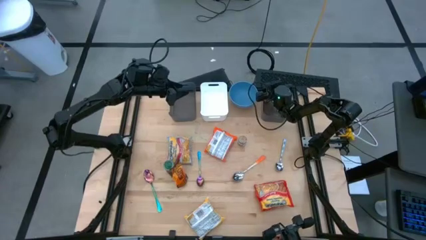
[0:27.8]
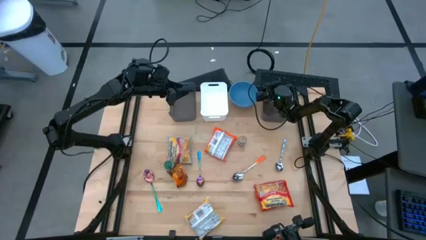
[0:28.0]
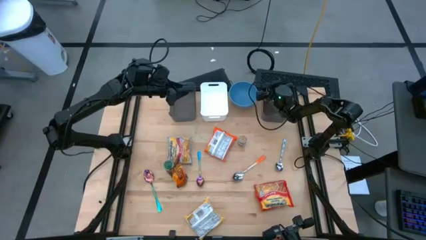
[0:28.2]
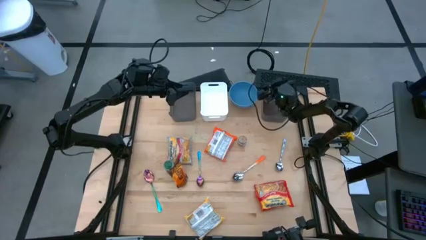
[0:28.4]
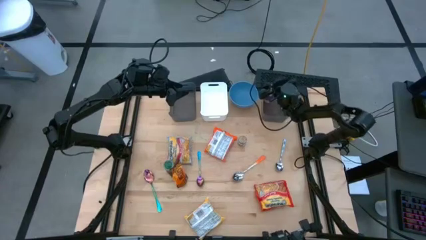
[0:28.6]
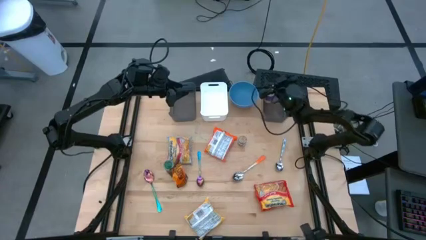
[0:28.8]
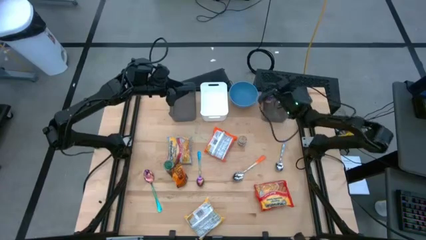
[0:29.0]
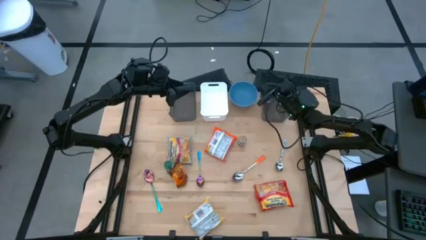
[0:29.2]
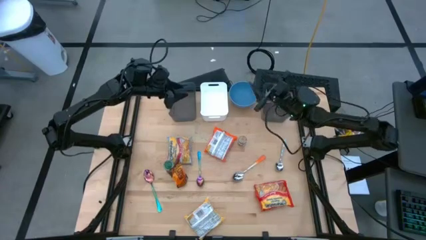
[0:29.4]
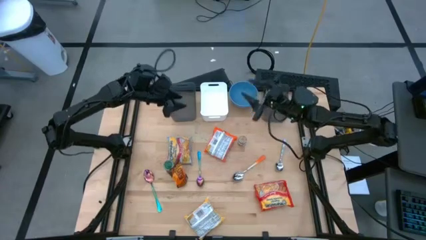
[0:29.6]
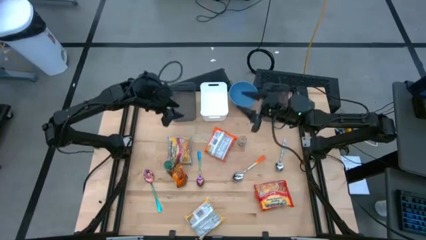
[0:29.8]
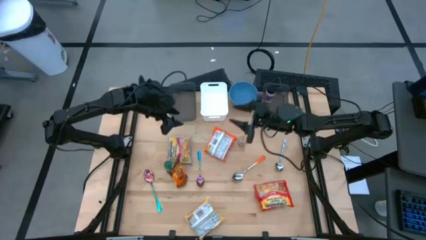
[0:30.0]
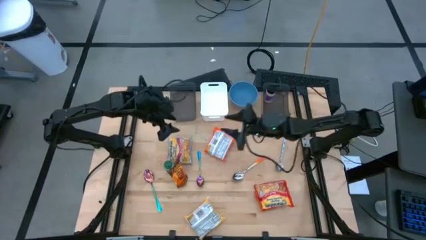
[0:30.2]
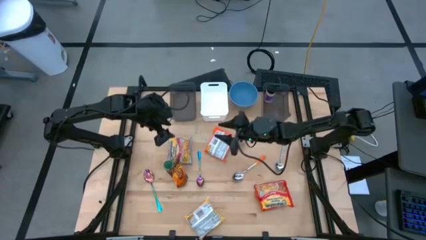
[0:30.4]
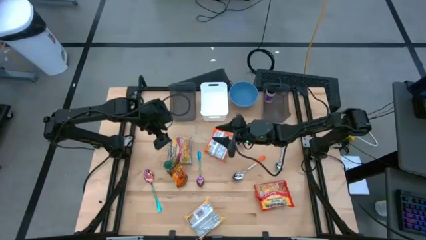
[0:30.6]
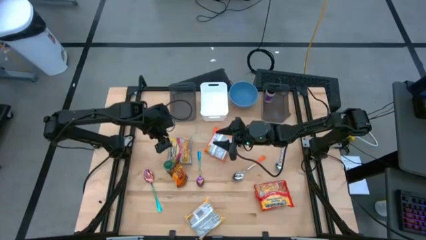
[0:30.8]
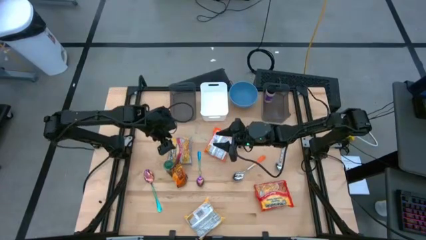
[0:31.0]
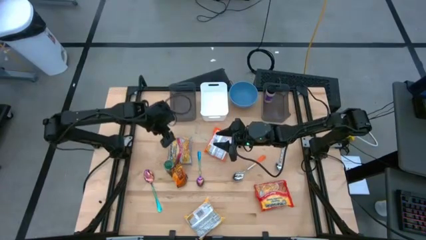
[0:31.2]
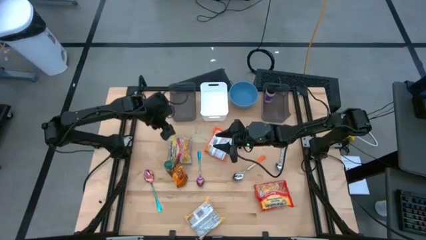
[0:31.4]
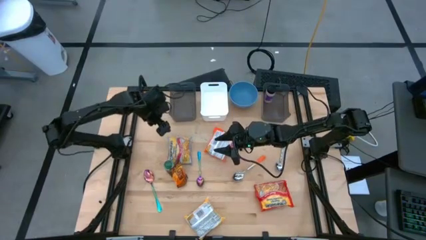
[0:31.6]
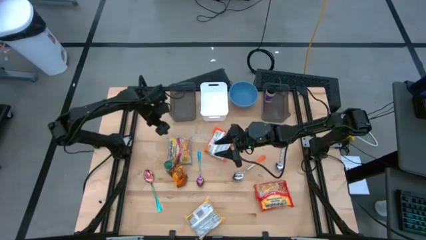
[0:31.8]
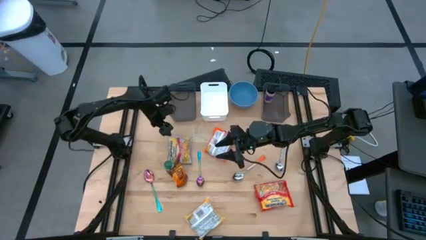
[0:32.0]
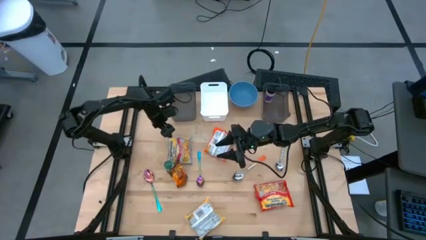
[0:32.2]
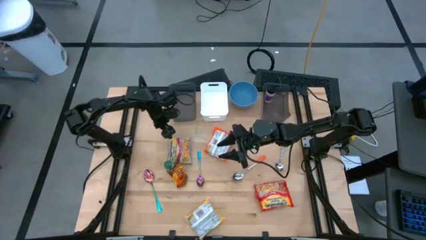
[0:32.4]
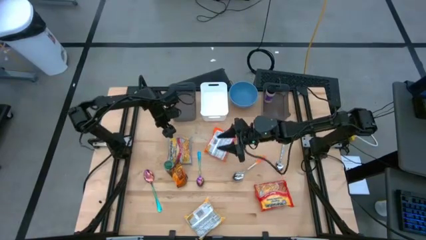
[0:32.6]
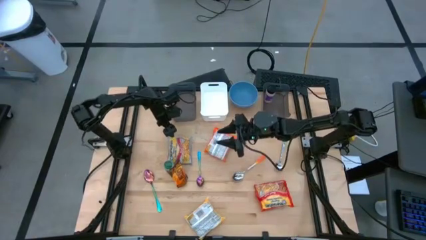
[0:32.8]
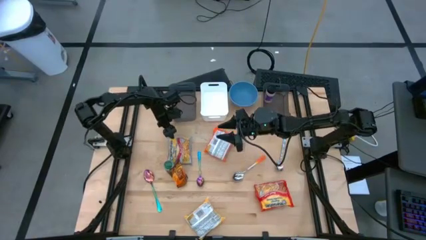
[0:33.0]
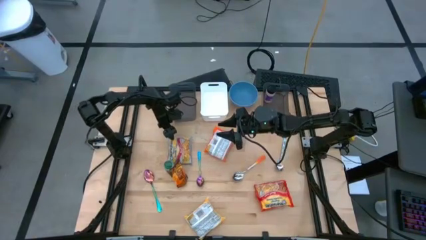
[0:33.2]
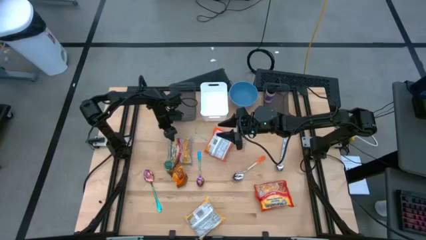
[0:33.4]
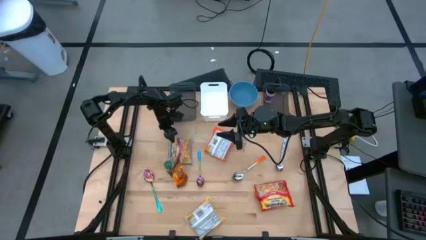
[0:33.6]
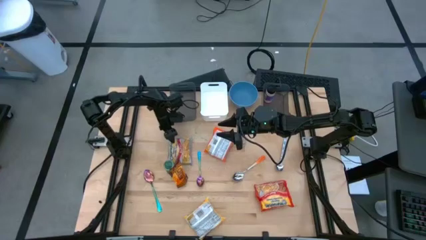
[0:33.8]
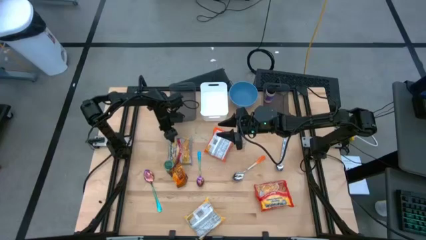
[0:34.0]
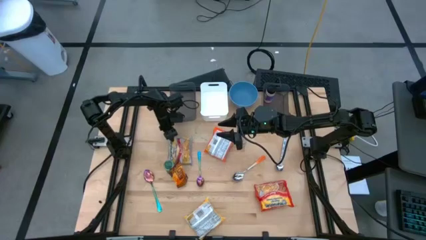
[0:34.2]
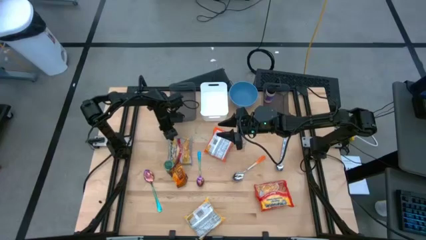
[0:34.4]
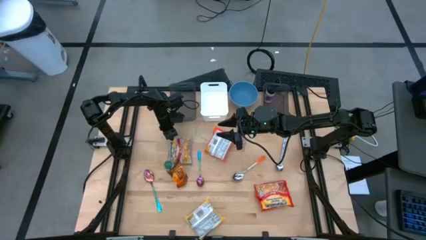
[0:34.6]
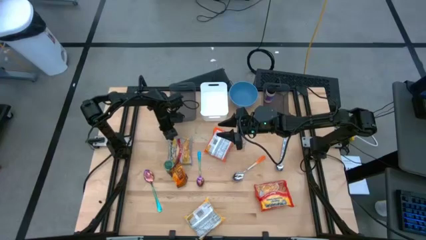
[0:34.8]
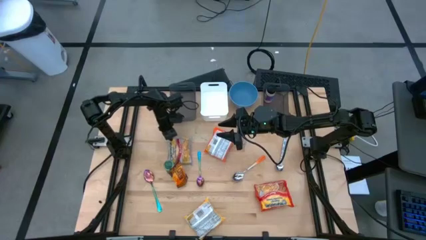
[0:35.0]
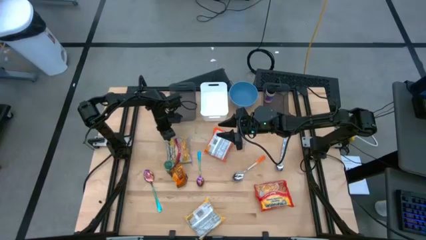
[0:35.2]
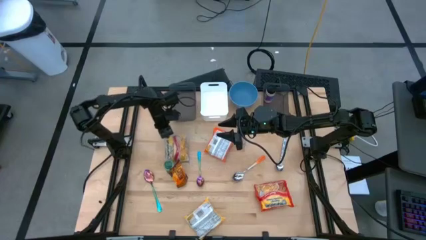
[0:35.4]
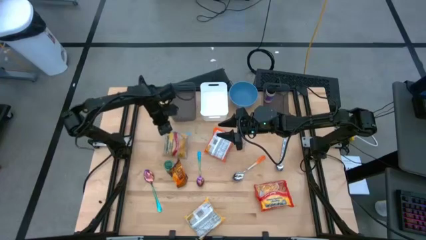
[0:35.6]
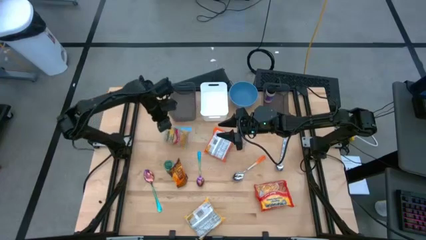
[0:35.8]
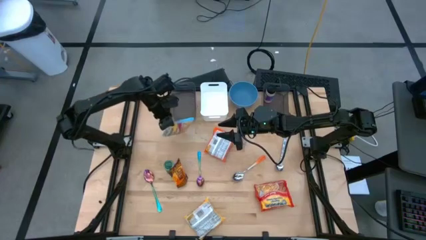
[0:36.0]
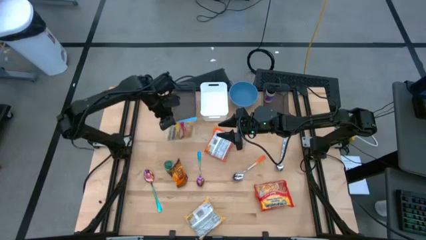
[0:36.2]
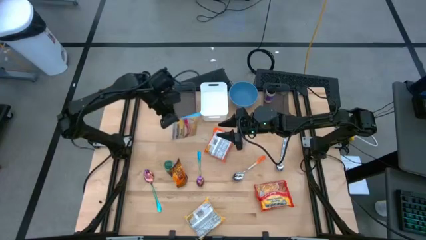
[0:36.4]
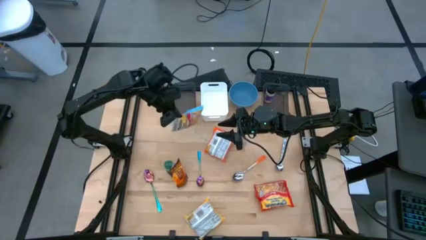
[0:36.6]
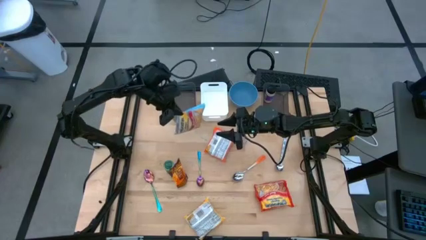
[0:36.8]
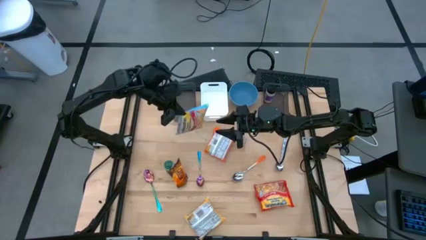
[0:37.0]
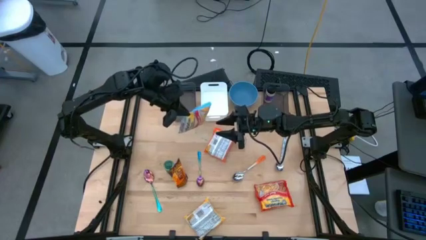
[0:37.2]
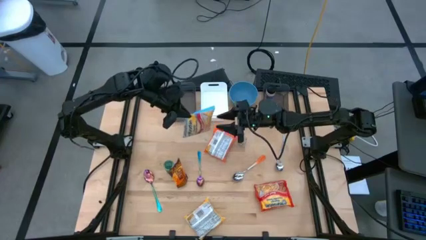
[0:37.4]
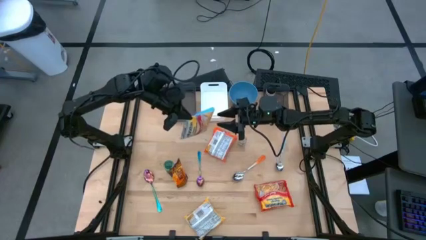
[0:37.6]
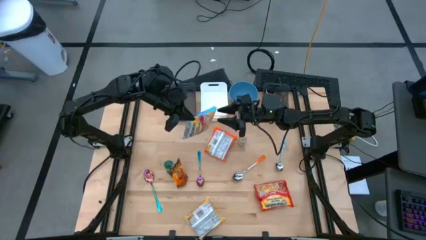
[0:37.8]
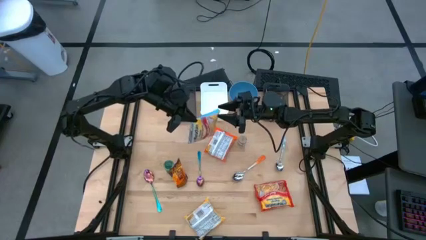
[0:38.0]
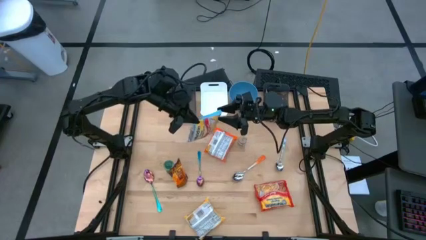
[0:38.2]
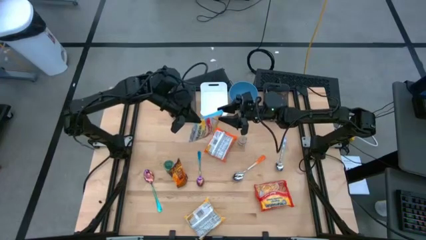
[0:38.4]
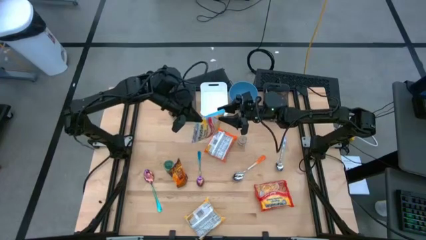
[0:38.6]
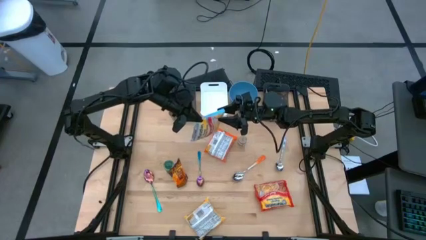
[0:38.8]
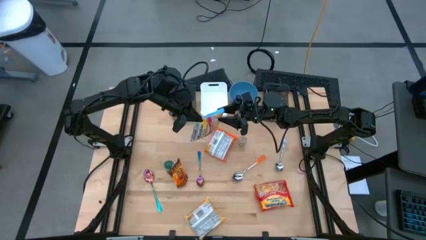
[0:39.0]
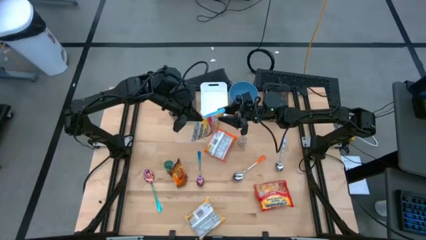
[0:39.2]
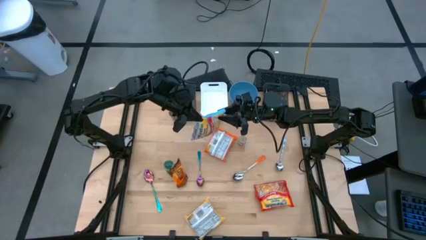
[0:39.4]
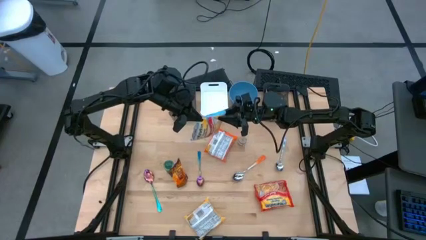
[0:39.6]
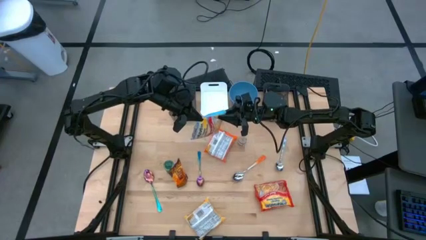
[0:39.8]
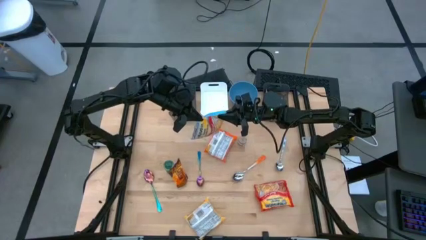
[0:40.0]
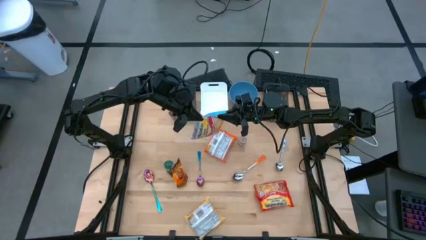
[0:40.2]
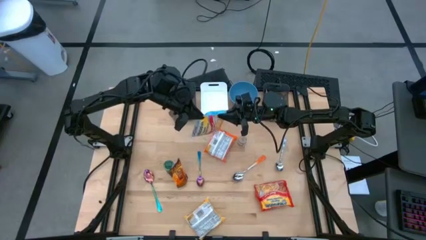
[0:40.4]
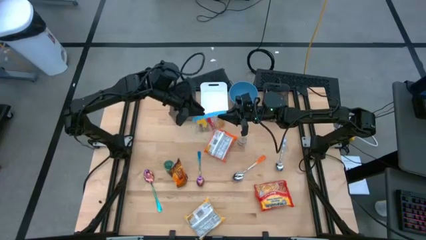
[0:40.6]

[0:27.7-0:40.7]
Task: Pick & Place Food Item
Put the blue noodle pack into the left black bin

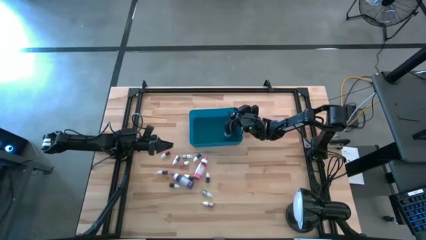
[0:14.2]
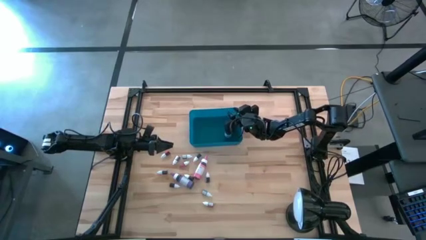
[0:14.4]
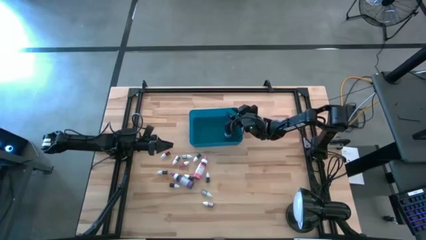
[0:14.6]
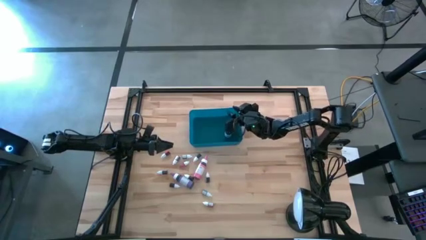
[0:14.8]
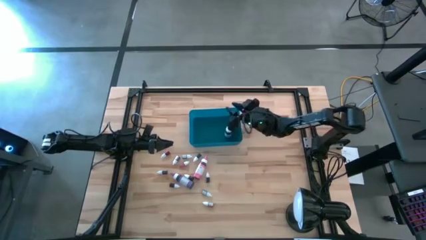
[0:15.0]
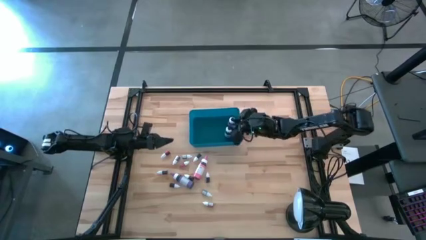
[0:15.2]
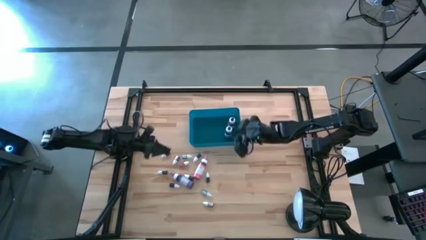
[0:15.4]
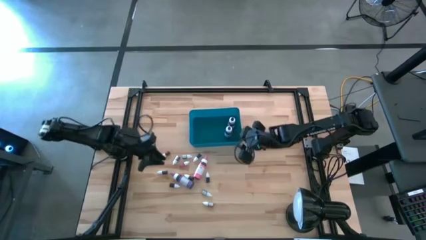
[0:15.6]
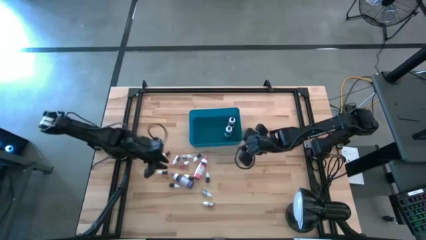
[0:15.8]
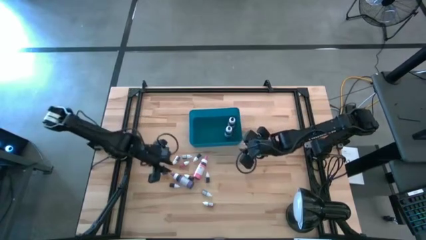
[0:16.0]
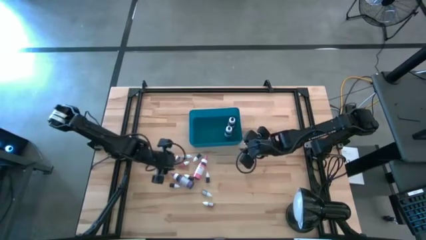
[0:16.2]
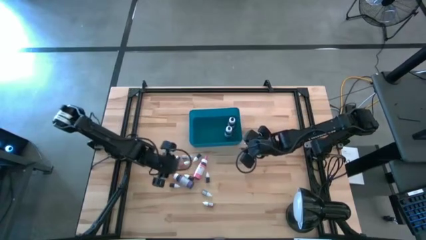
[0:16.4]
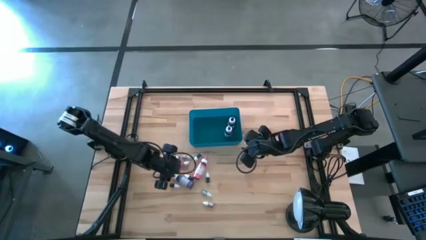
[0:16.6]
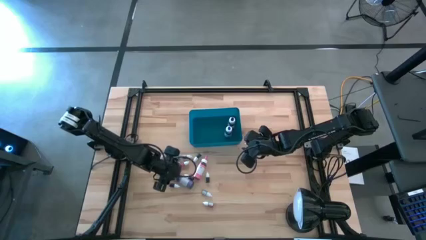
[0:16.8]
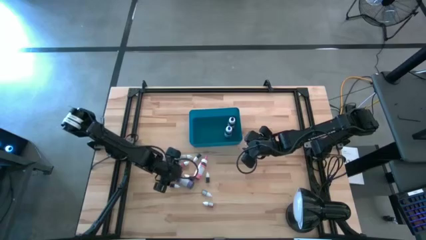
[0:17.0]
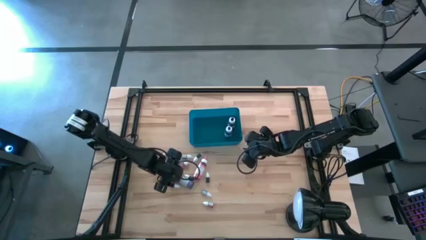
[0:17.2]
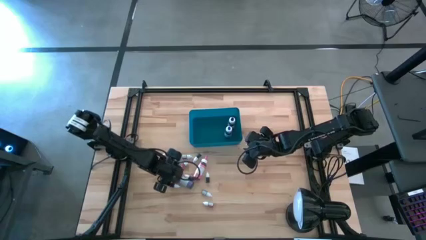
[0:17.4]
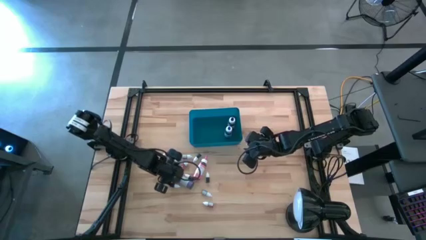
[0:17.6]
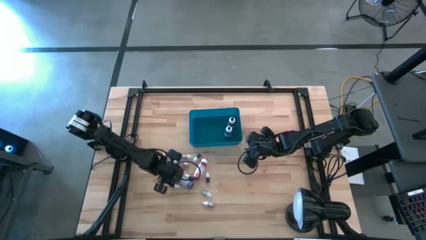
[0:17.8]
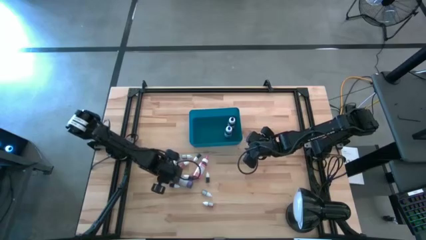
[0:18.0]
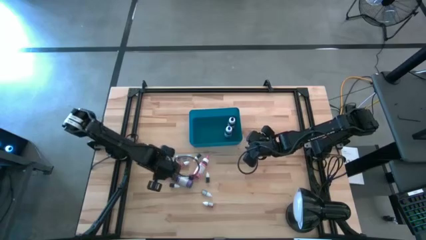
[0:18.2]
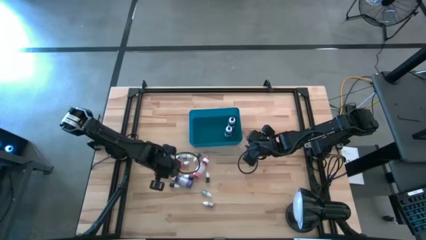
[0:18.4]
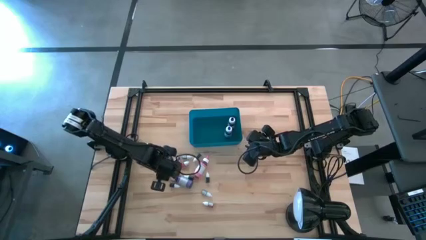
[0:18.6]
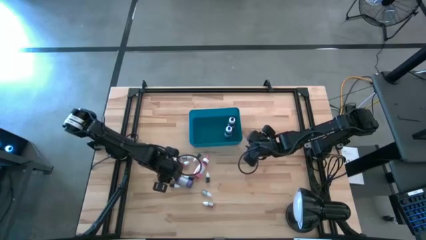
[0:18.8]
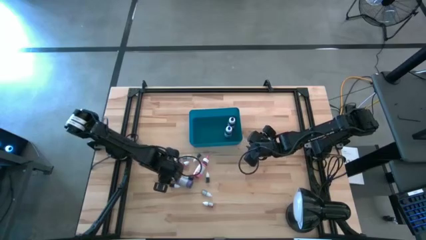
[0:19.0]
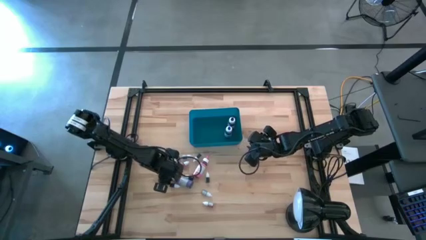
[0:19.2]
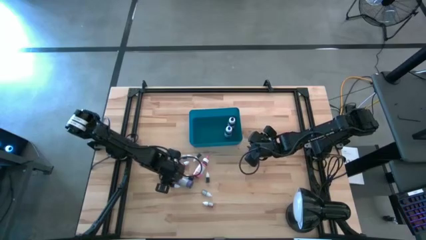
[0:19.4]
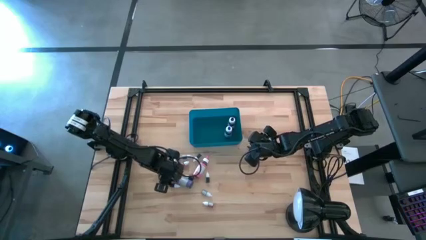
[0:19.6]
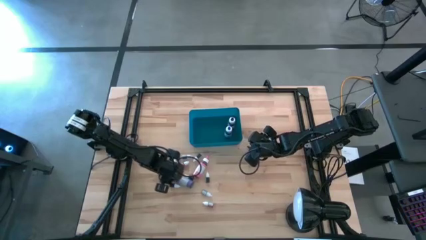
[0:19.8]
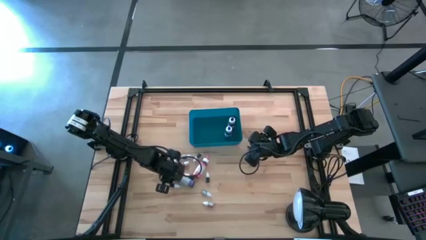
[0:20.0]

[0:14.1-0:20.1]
Task: Pick & Place food coloring
Put the large purple food coloring bottle into the bin
